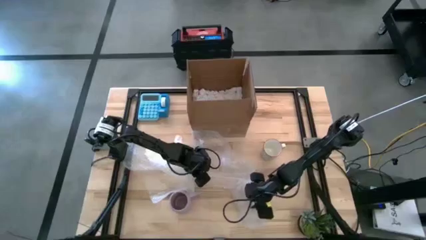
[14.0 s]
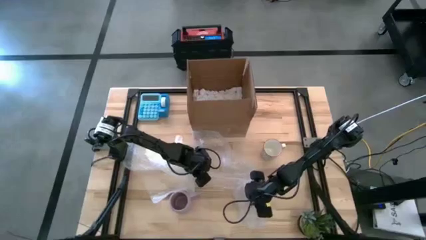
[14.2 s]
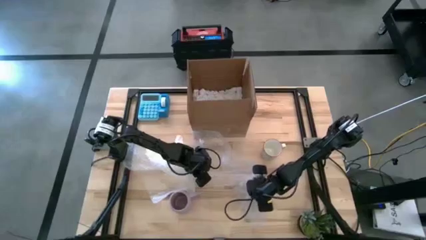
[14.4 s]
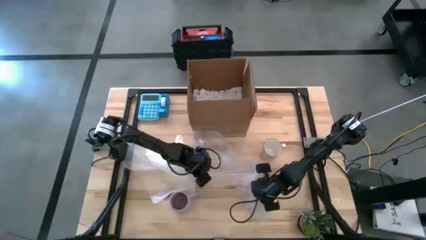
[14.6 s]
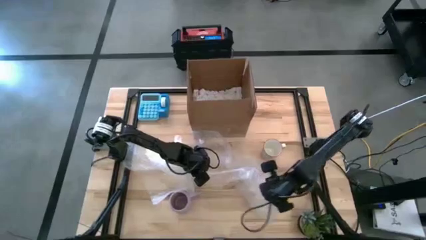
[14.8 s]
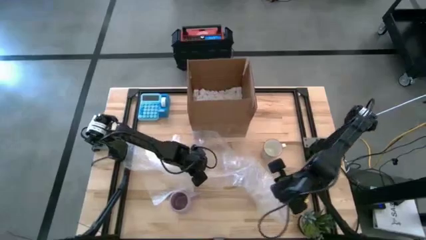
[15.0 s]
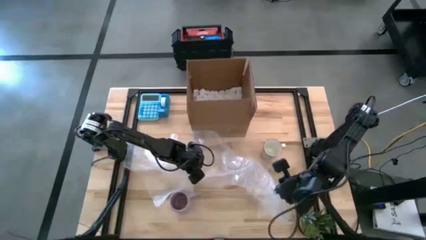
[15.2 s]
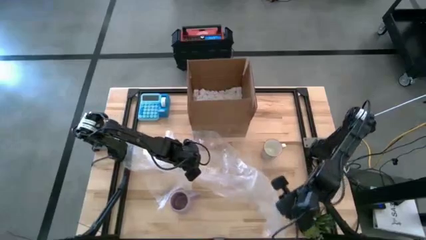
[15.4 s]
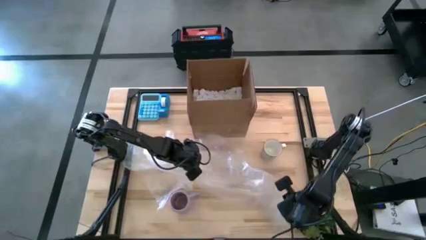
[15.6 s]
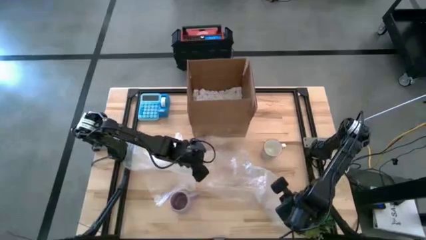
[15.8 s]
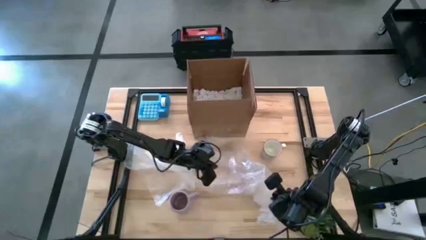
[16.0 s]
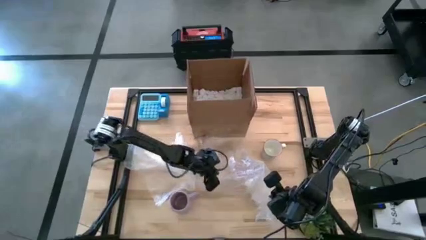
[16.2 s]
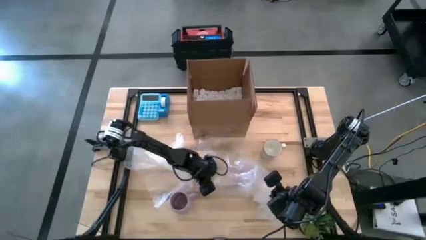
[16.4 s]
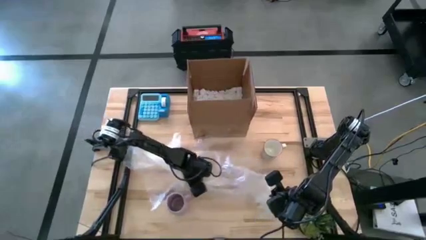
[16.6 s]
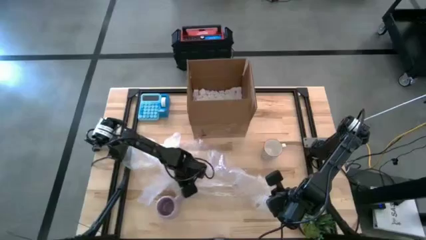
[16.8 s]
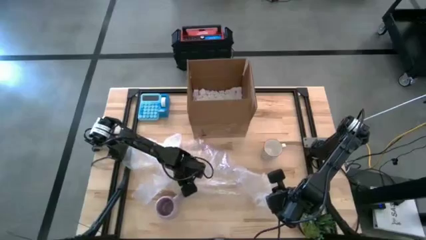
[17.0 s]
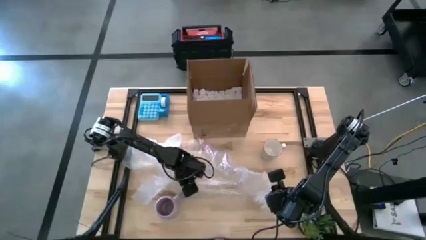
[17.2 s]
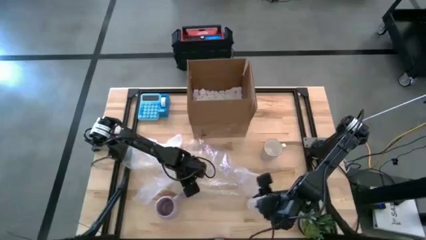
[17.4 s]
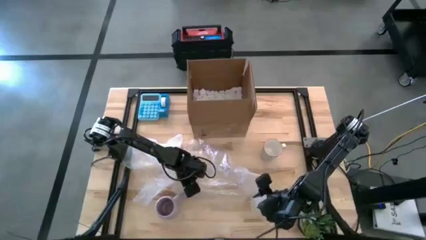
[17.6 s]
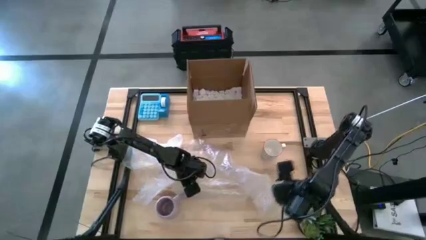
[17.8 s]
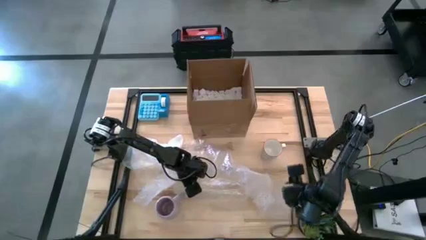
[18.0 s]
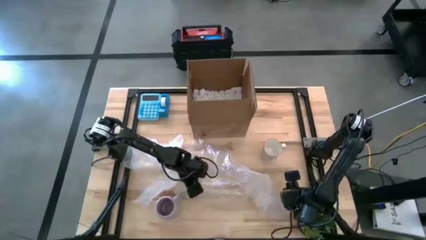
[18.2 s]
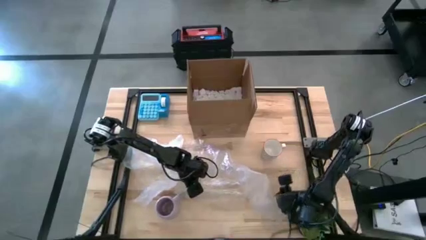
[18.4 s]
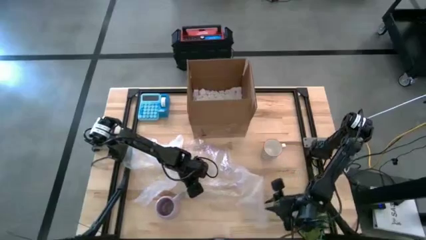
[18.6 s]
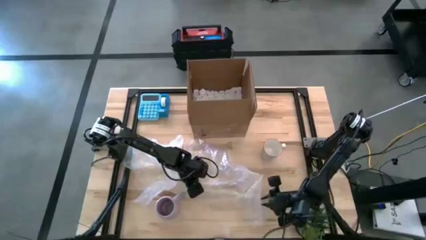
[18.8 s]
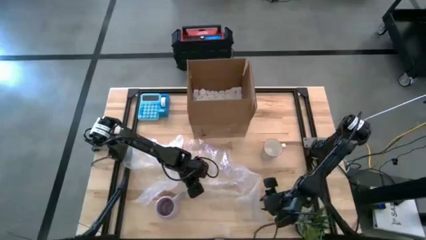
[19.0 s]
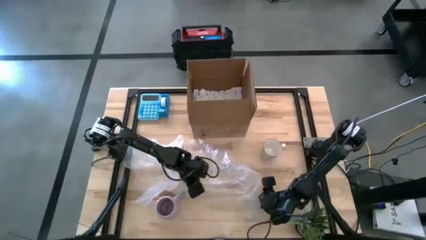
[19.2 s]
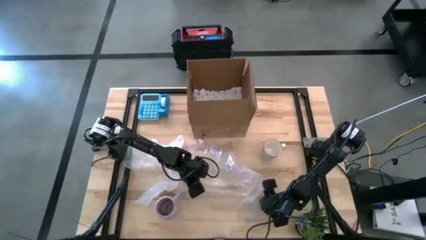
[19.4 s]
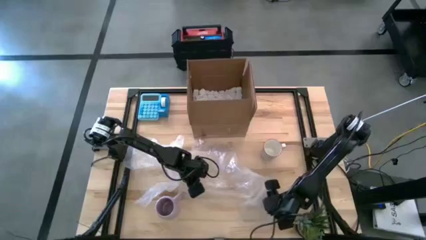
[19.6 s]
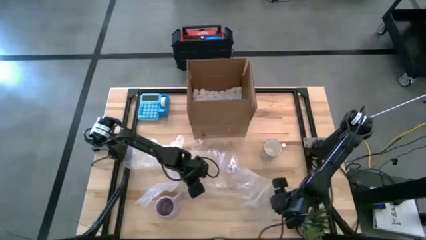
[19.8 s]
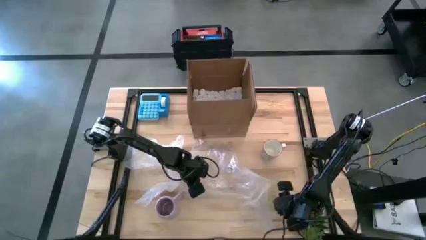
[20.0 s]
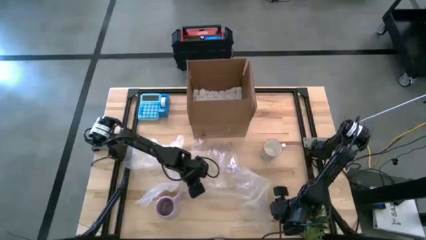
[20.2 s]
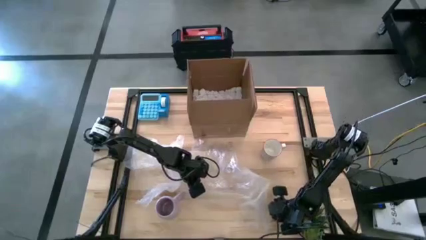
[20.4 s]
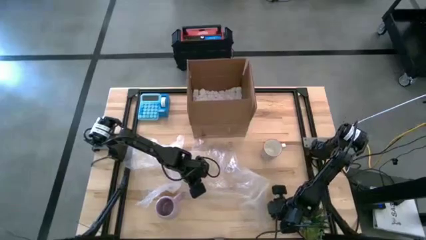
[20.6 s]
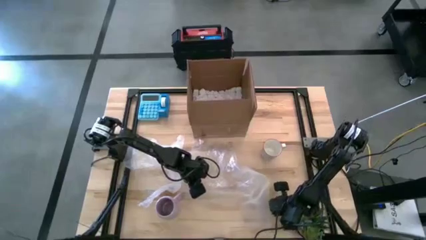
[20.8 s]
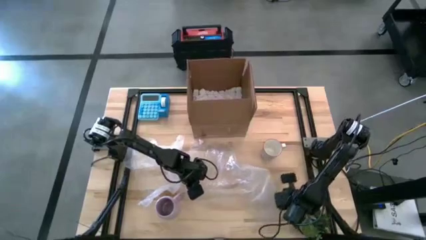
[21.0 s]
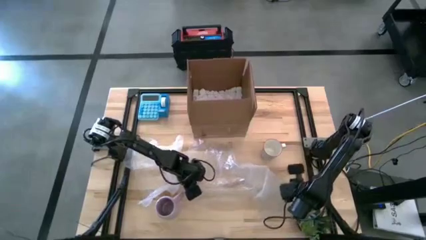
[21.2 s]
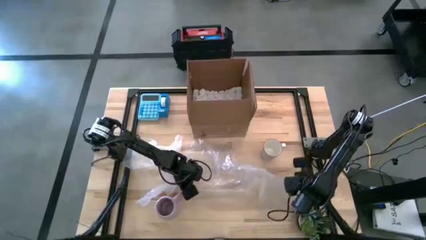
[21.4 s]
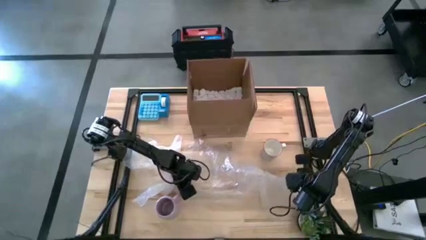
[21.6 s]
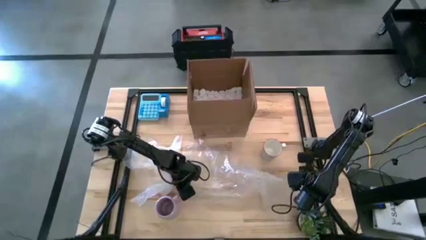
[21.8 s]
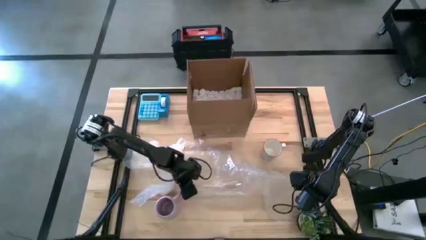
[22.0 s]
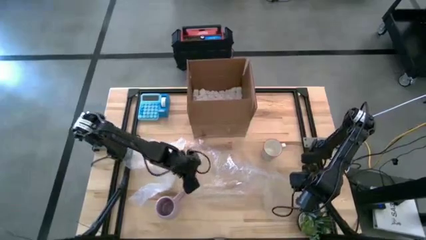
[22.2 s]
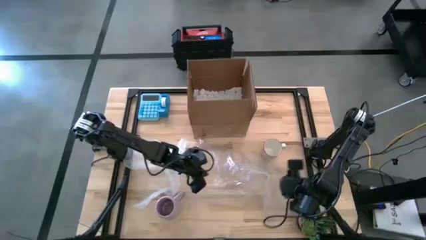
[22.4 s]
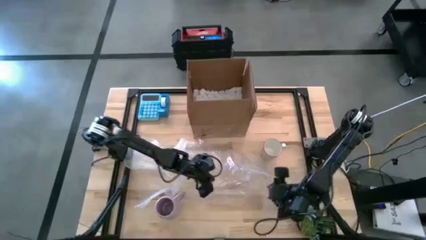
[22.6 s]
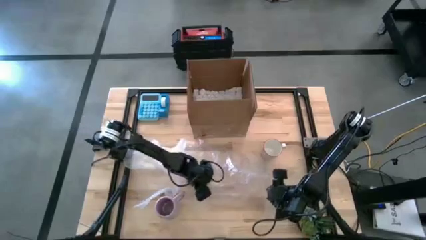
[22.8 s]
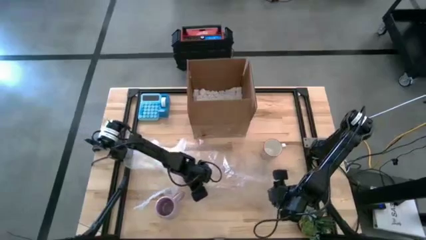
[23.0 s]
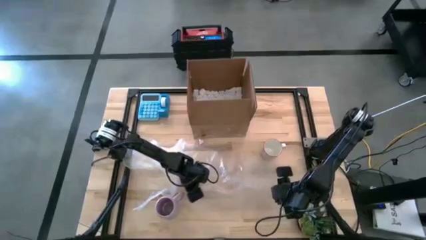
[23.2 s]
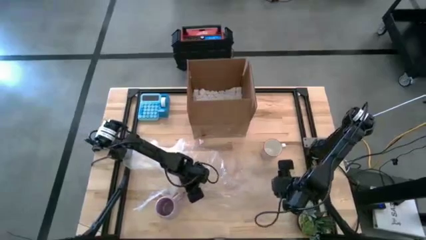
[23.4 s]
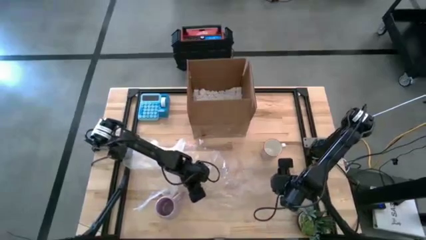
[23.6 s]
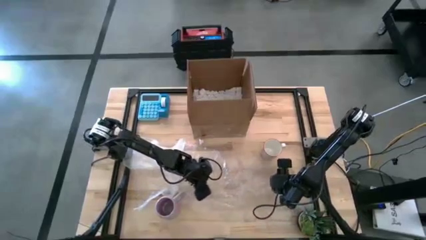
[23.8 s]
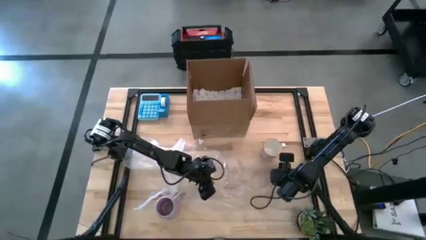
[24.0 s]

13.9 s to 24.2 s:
Task: wrap mug
Prepare the right bubble wrap

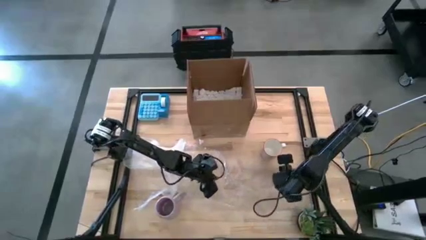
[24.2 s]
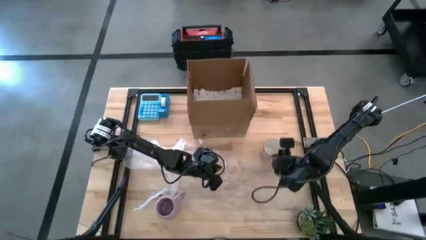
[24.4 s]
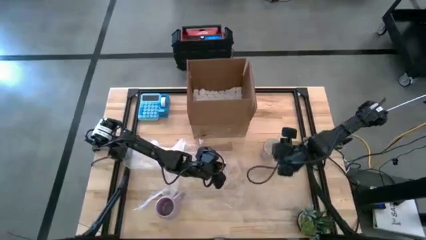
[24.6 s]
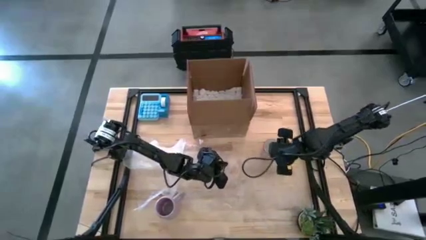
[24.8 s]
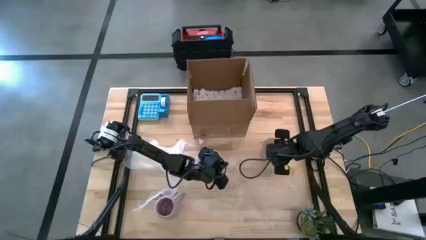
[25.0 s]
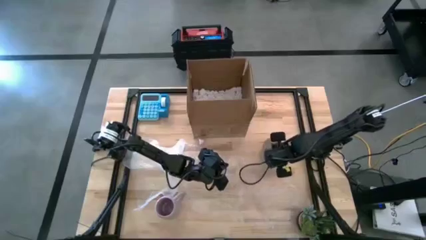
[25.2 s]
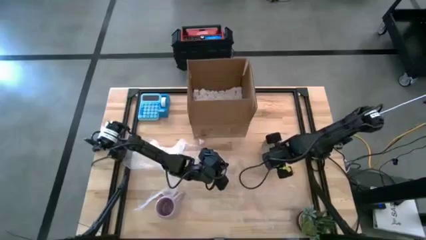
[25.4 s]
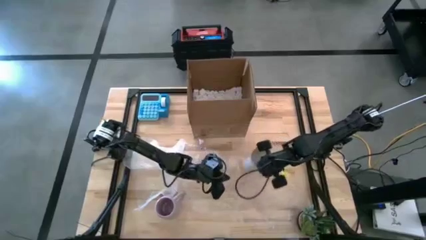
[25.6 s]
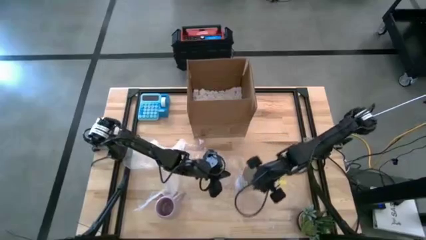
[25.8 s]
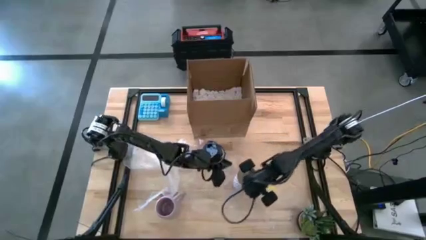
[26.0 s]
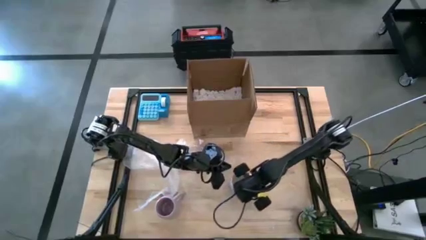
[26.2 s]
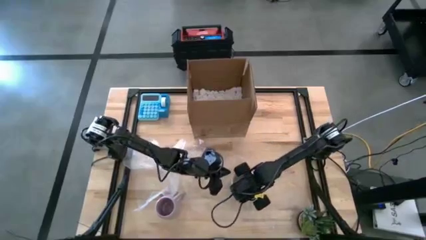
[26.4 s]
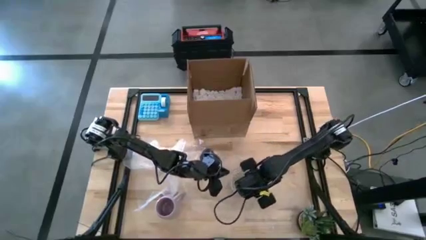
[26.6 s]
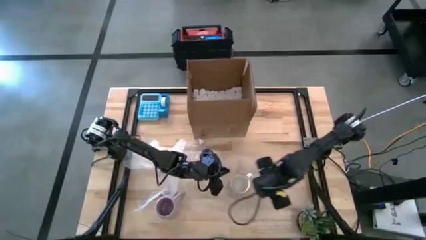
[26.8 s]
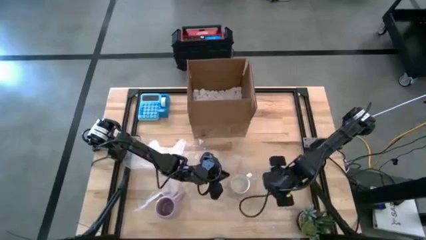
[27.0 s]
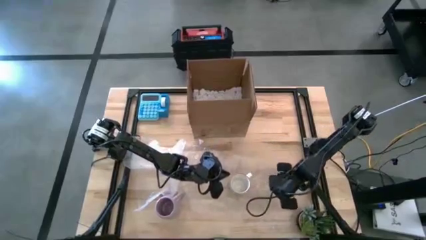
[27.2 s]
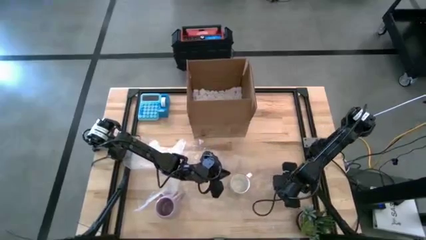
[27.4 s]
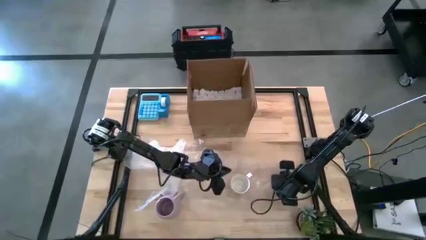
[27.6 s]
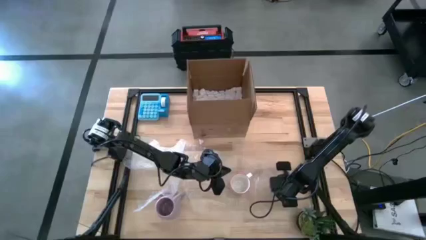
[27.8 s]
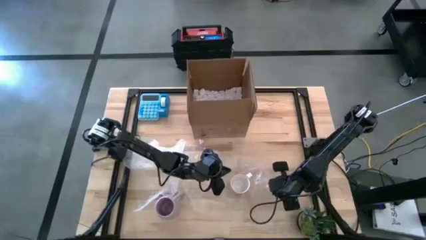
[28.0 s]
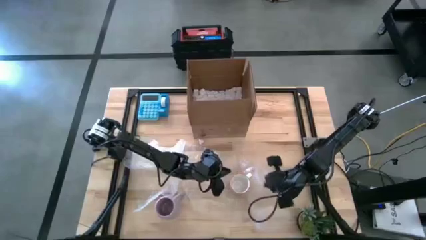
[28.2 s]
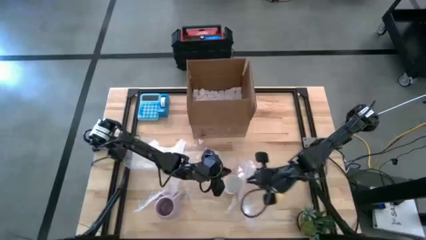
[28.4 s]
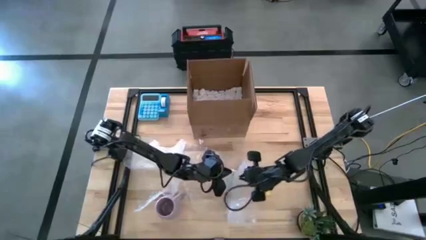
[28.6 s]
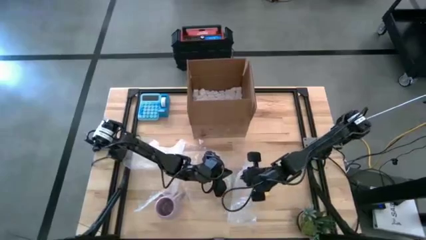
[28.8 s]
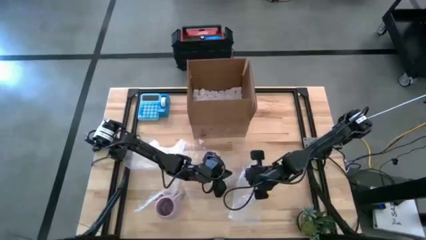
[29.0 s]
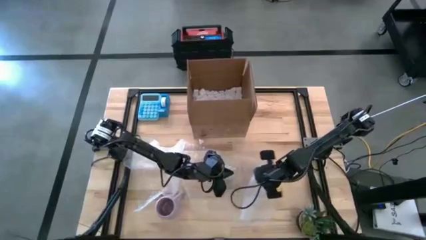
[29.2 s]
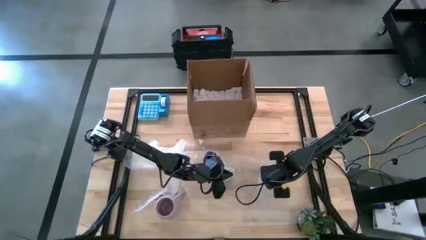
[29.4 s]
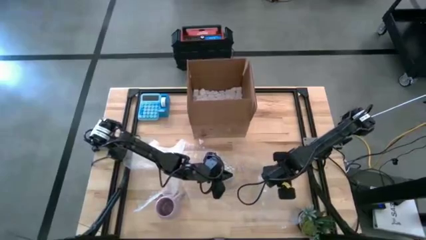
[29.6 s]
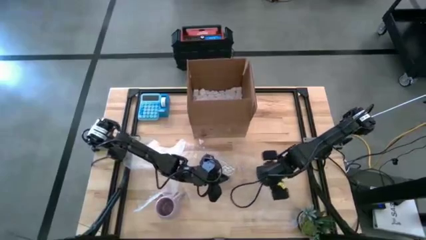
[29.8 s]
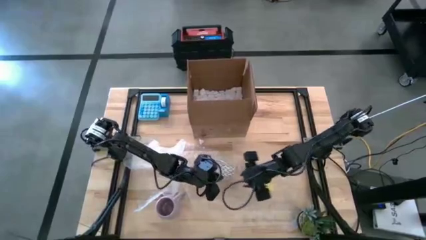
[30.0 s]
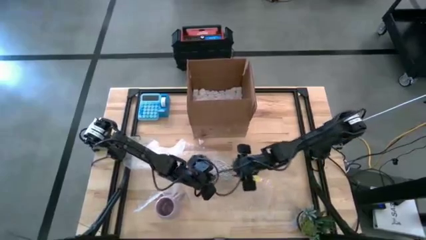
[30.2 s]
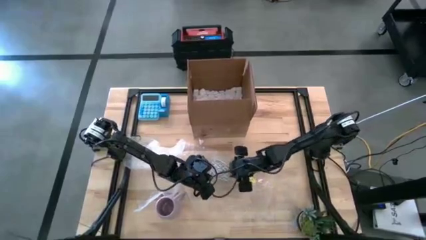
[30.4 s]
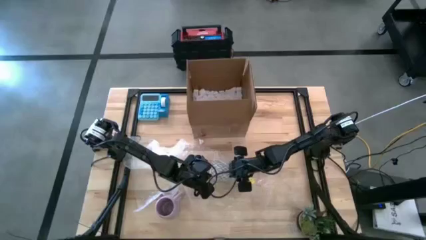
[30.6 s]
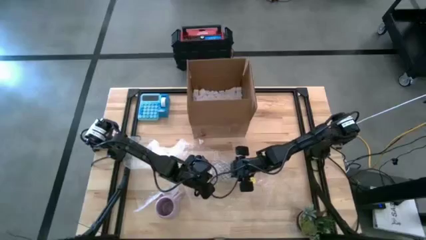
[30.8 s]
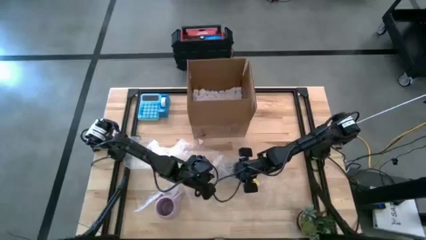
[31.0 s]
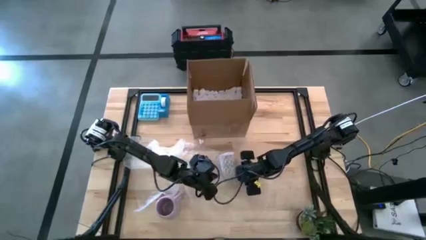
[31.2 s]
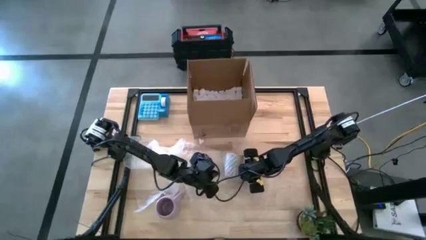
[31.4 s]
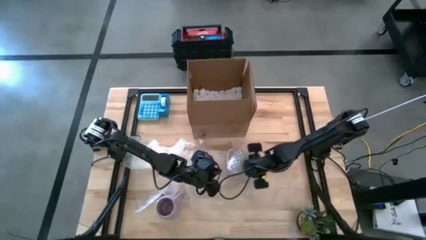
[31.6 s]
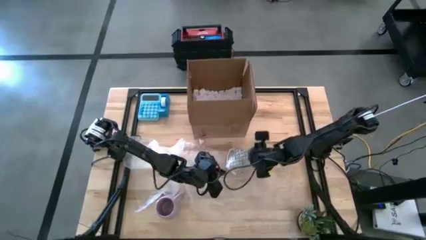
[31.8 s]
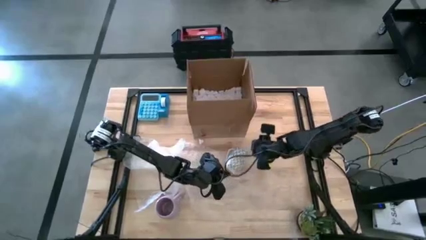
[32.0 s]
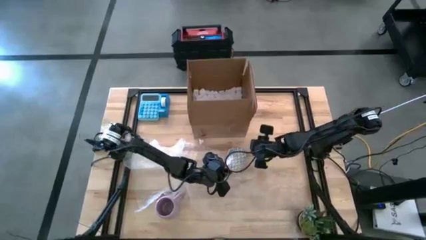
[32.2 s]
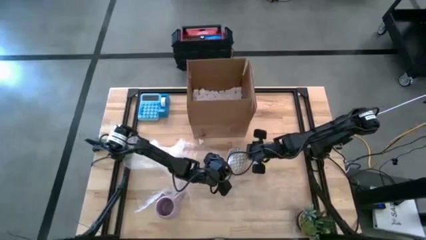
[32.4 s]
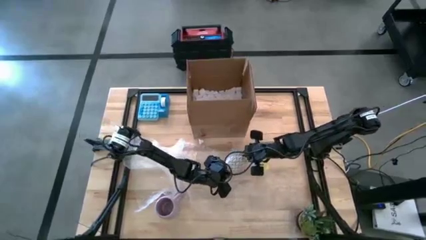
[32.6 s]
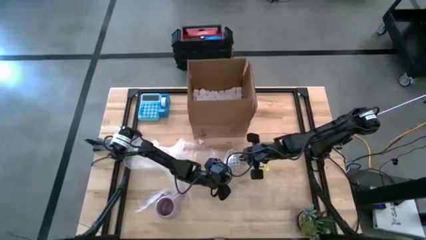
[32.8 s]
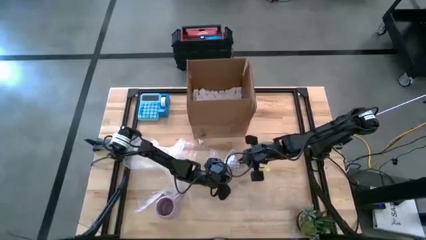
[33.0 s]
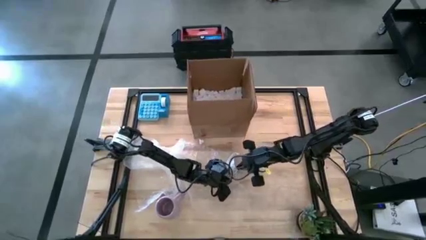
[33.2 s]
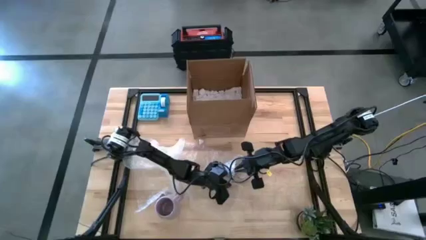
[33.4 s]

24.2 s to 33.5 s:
Wrap the white mug with bubble wrap
